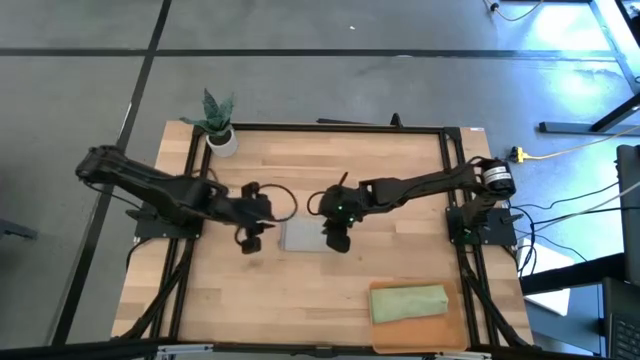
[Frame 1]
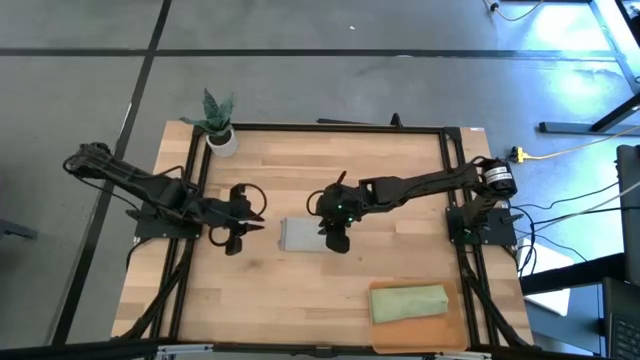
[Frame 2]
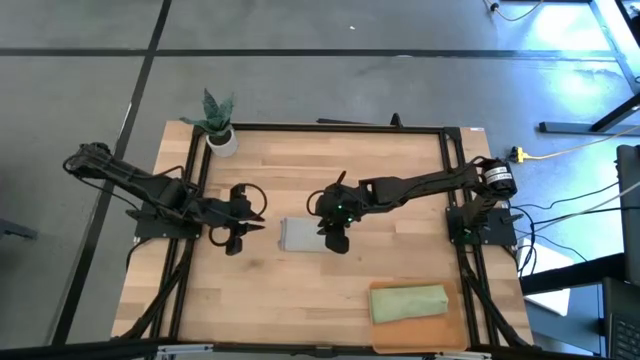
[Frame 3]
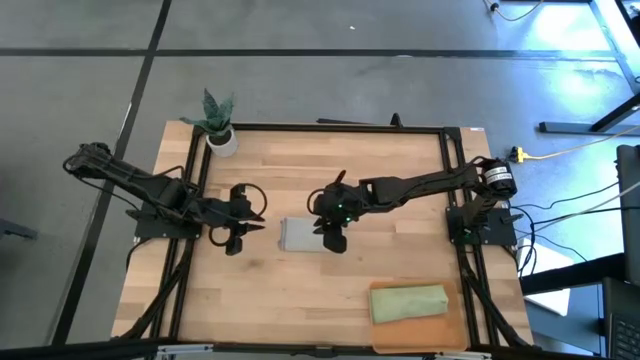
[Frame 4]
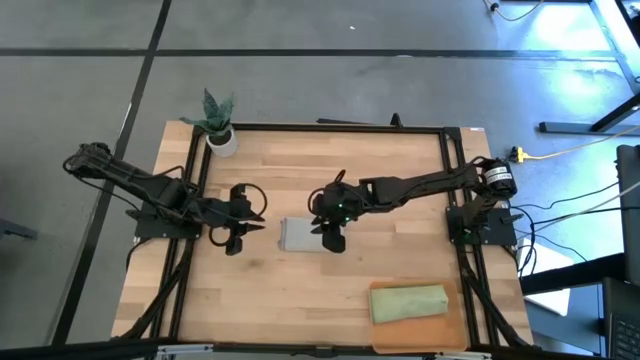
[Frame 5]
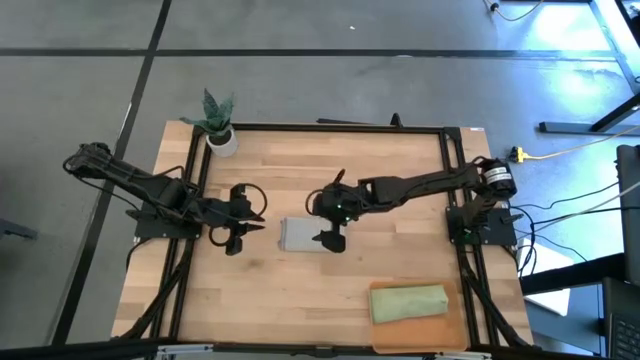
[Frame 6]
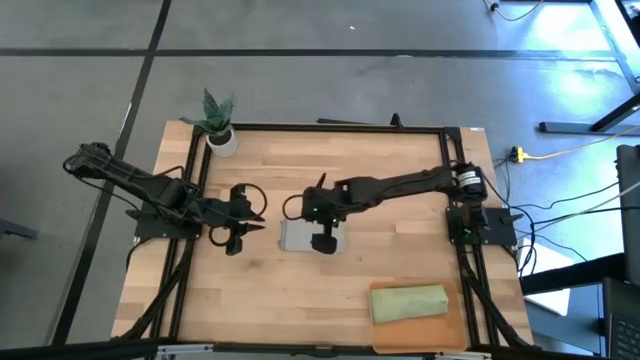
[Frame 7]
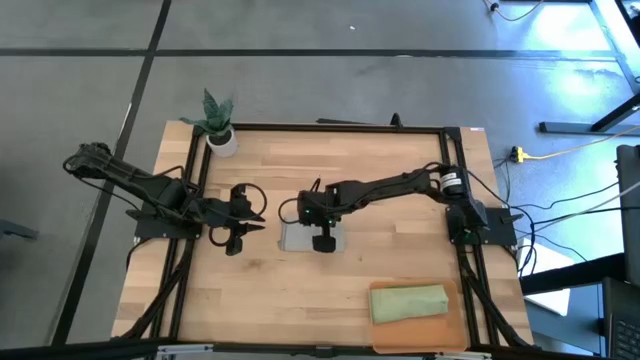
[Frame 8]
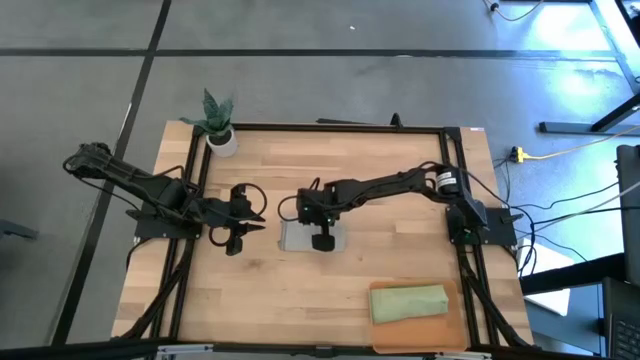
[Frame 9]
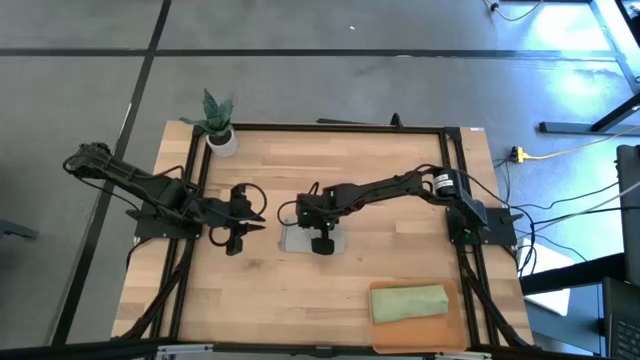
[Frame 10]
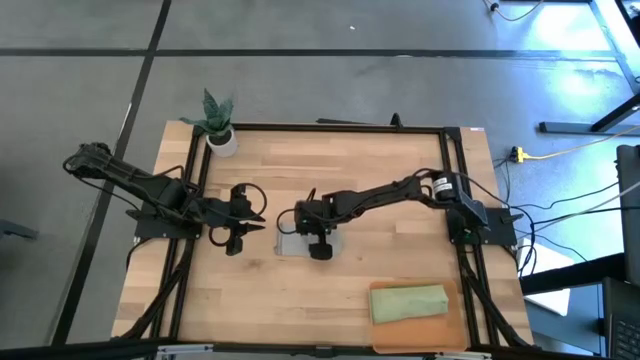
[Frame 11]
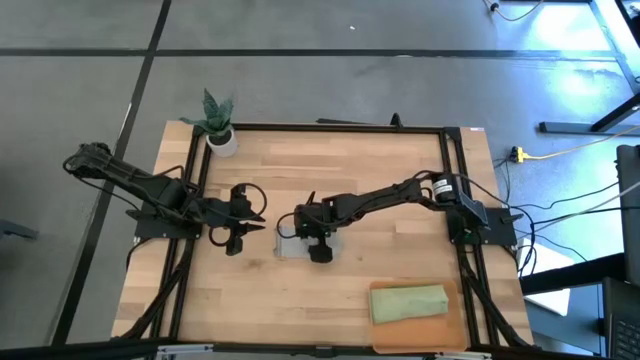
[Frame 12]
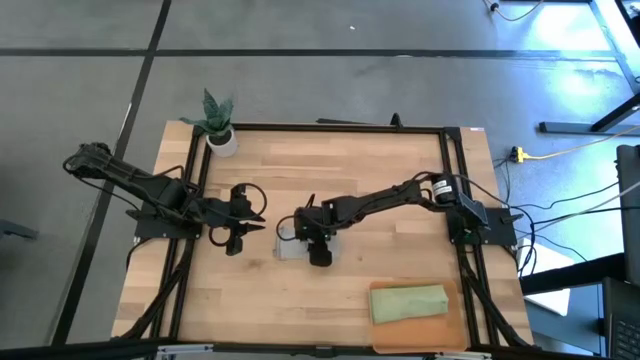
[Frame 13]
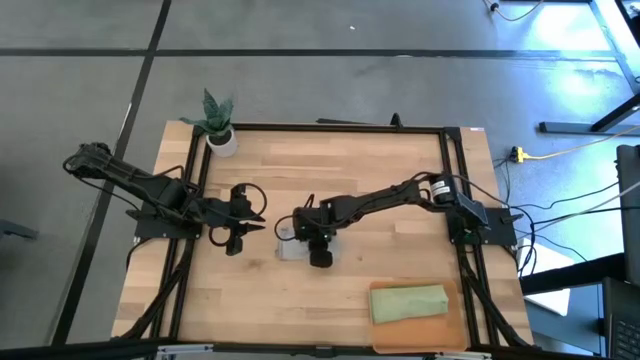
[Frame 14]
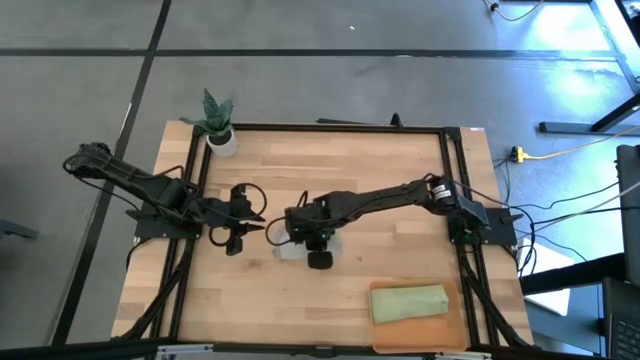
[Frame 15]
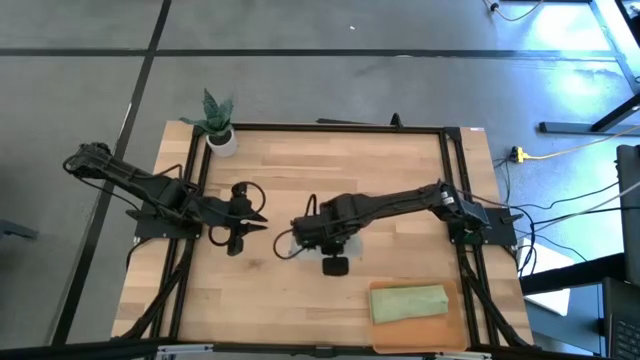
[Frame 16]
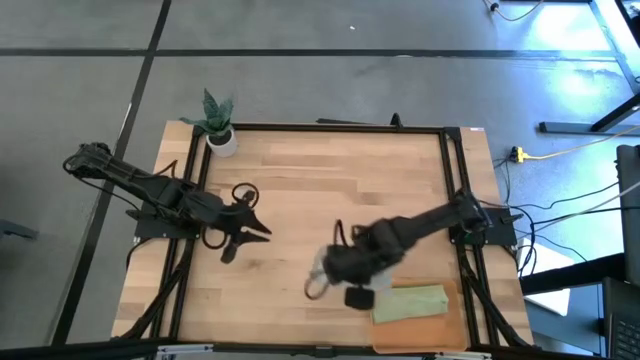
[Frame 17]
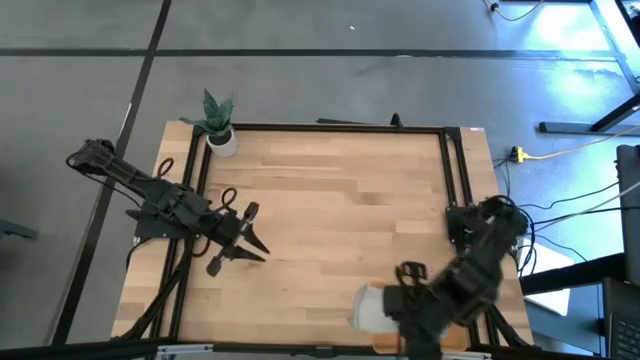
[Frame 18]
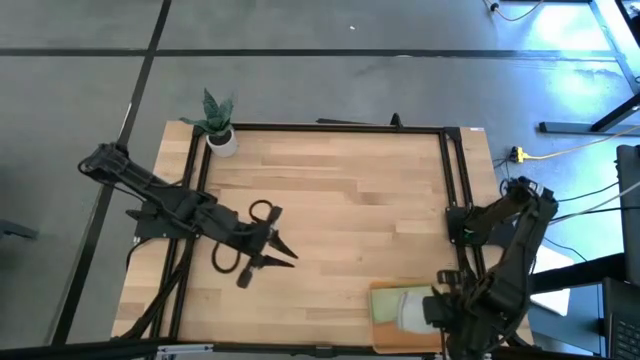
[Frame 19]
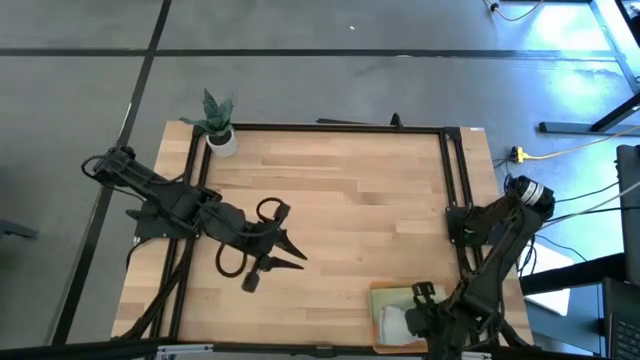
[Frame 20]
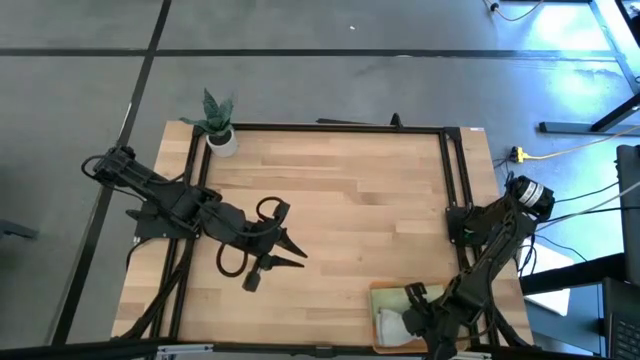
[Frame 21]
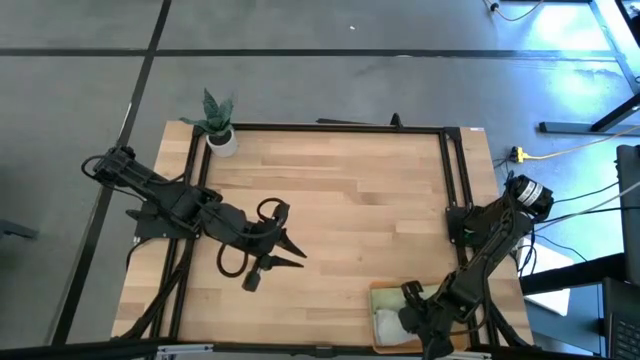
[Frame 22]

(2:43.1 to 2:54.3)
Task: Roll microfiber towels into tight, uniform cylinder then place into a basket
Put the gray microfiber cloth into the orange bin

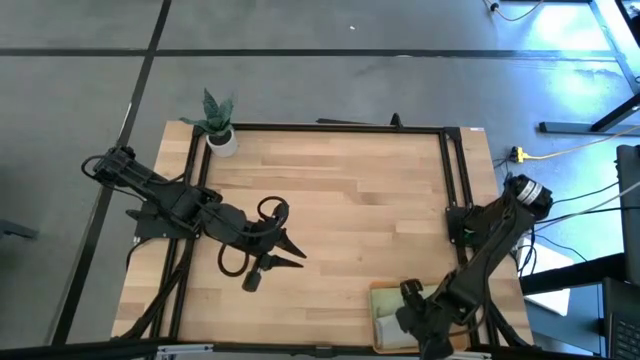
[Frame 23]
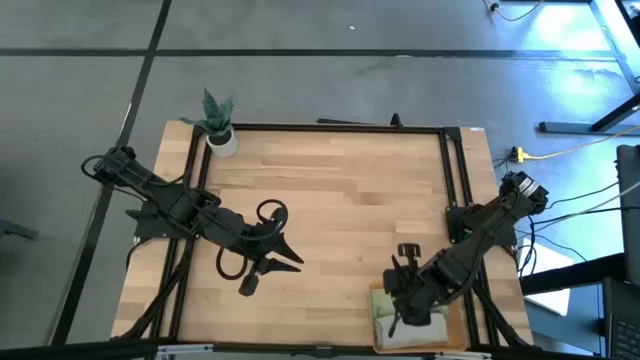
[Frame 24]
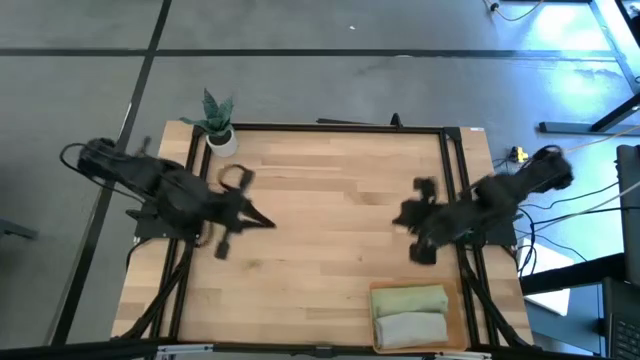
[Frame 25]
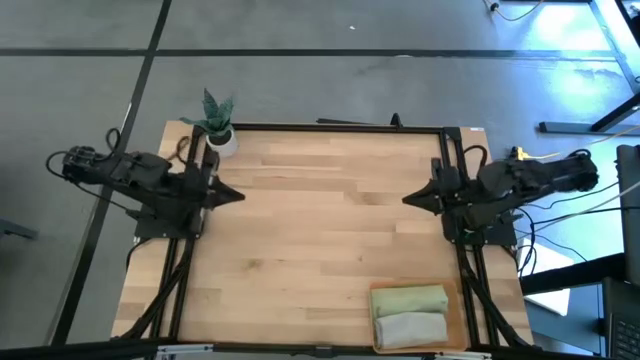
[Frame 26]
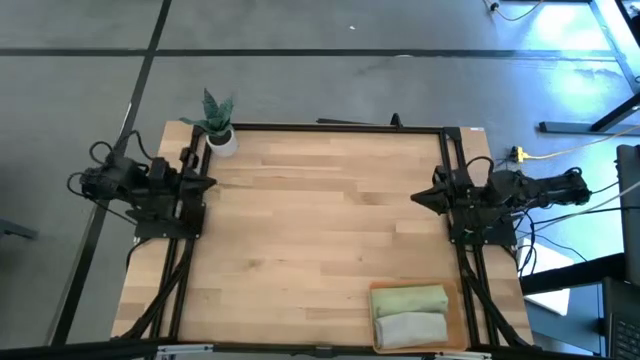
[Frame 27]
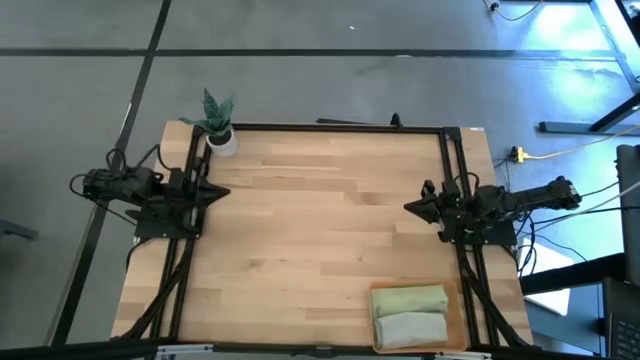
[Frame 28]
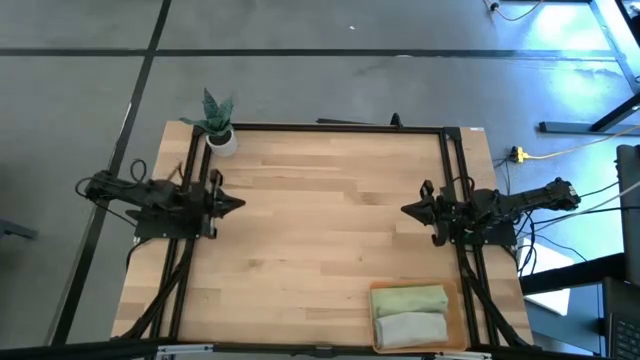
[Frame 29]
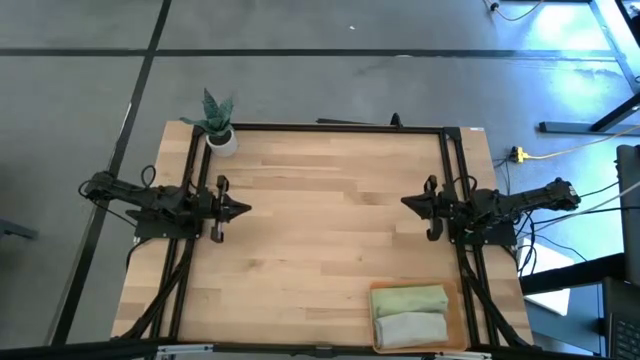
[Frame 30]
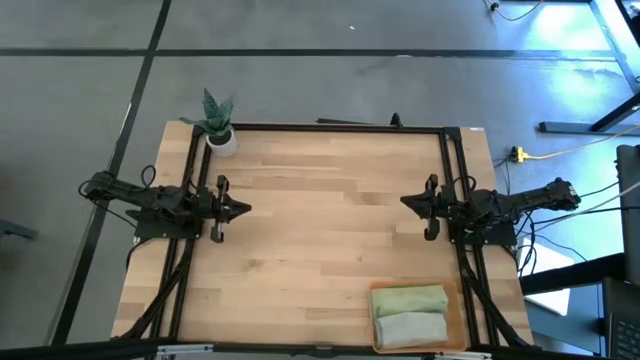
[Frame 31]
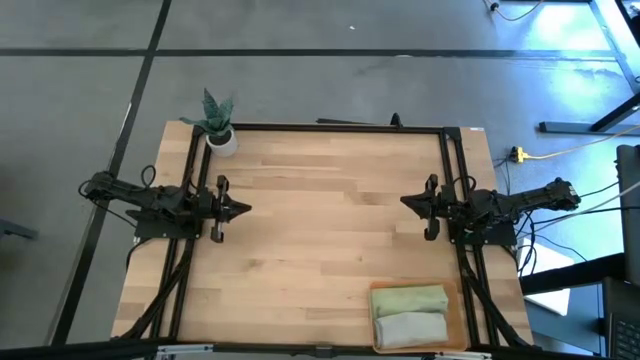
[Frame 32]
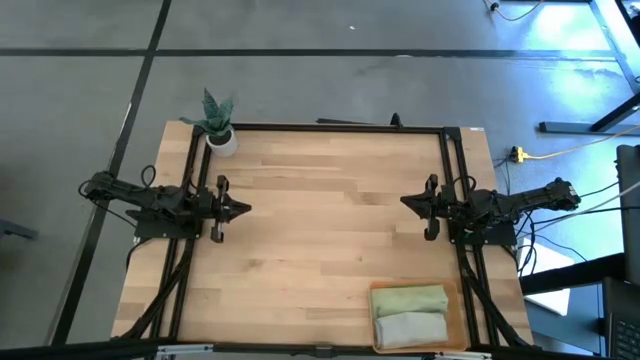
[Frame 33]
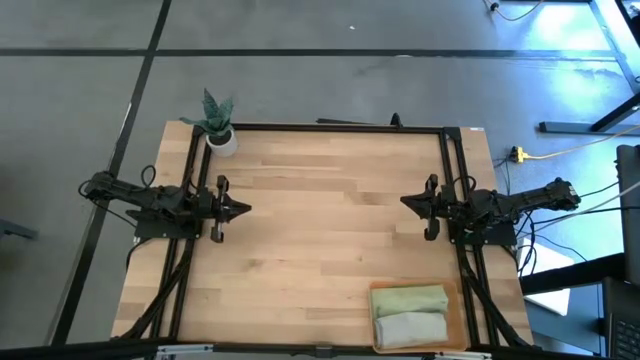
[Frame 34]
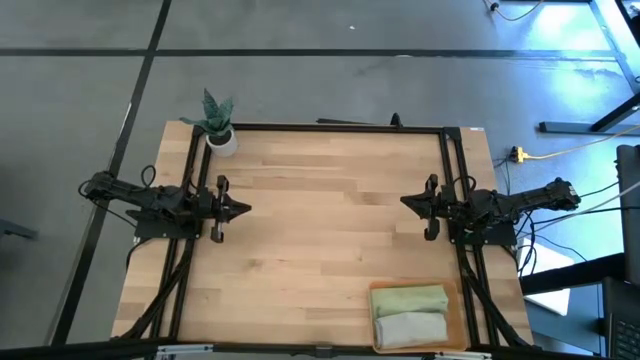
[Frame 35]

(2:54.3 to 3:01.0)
Return to Home Position

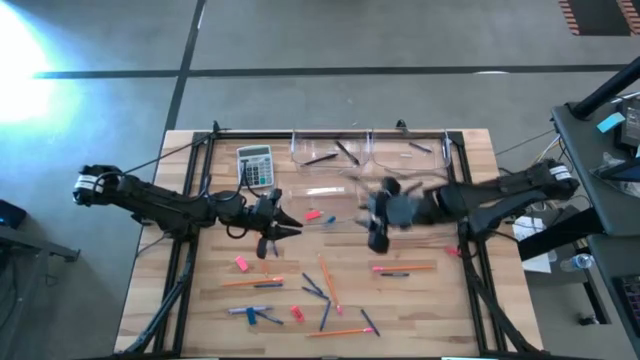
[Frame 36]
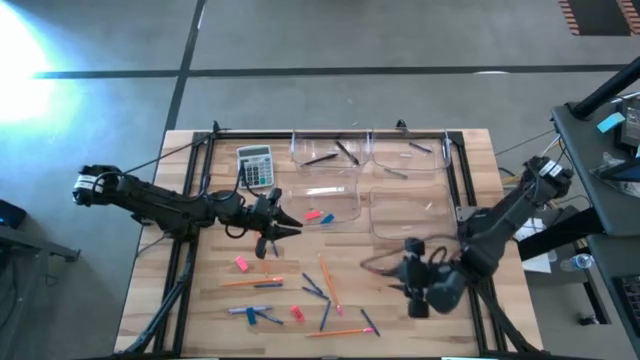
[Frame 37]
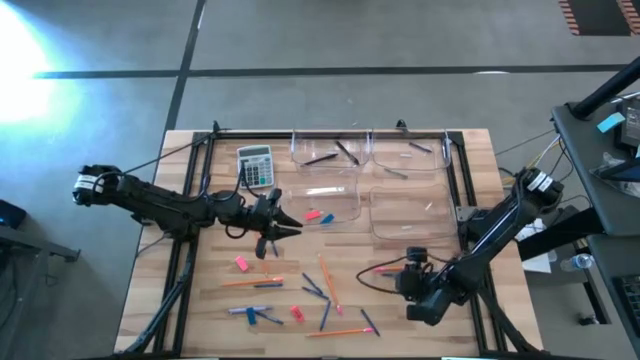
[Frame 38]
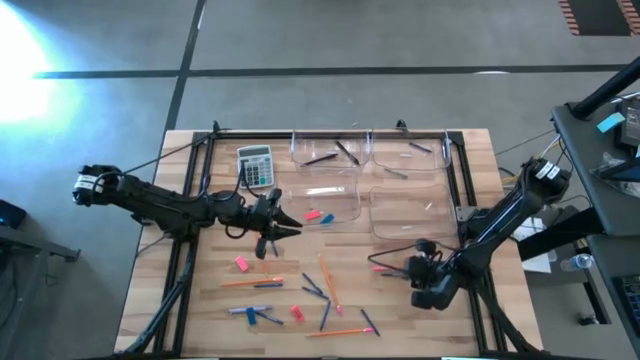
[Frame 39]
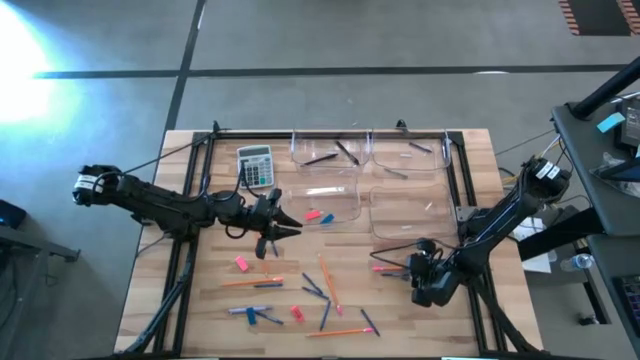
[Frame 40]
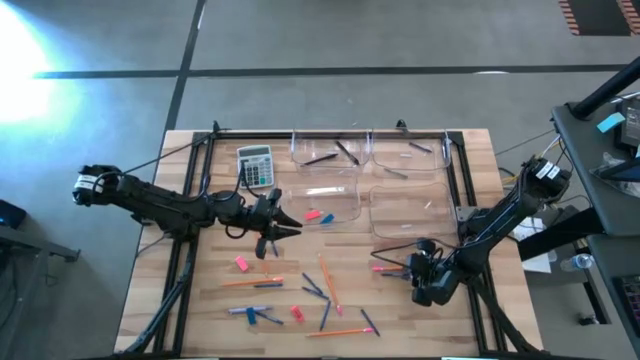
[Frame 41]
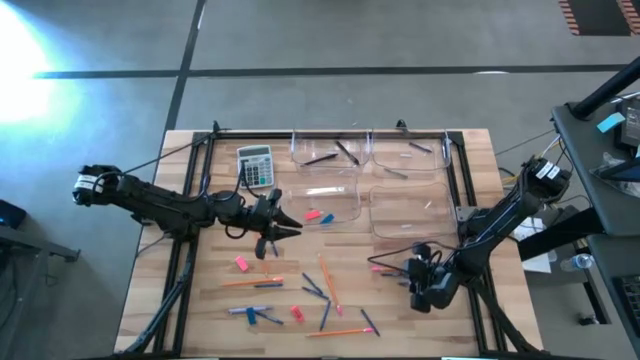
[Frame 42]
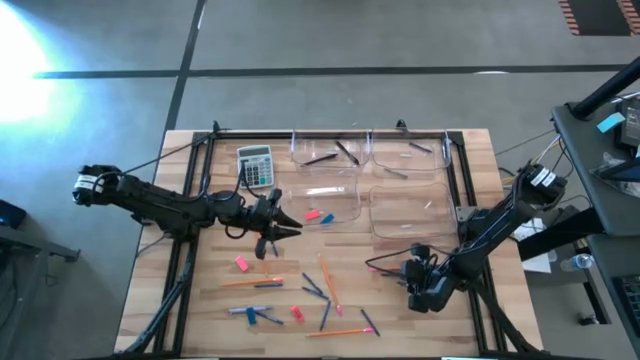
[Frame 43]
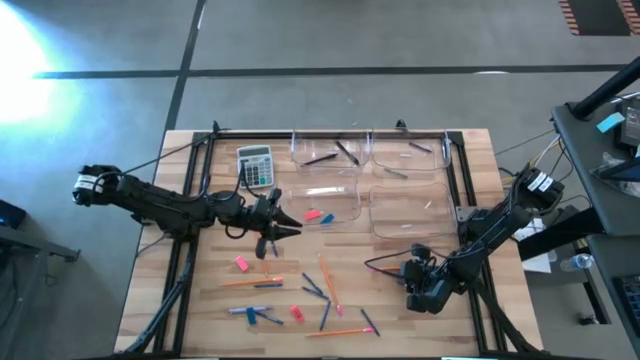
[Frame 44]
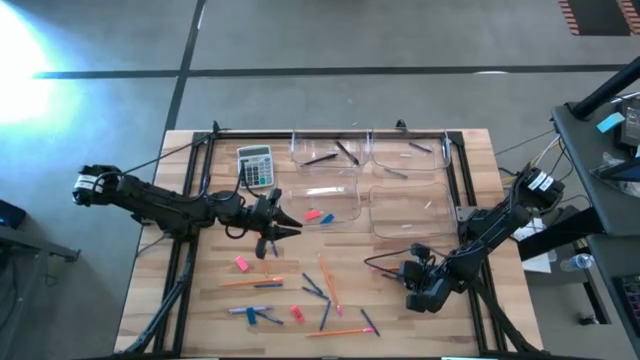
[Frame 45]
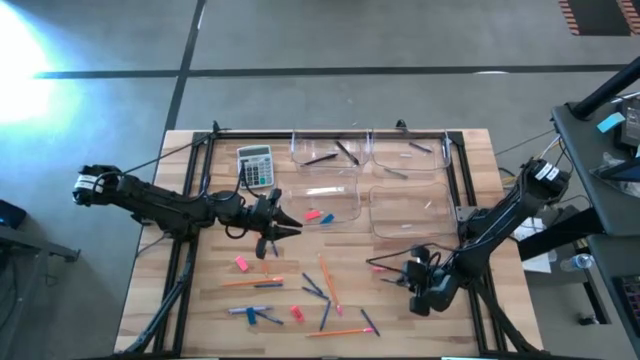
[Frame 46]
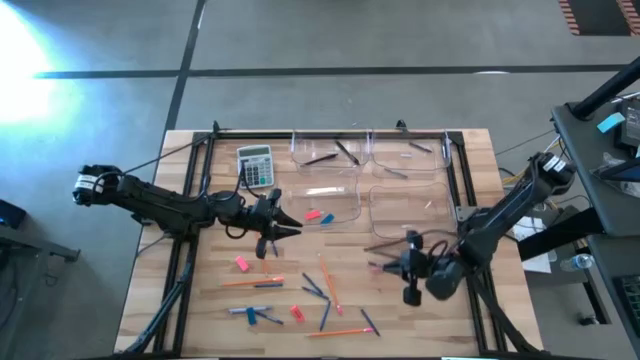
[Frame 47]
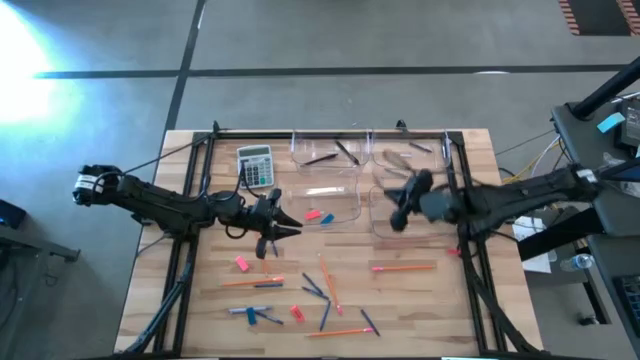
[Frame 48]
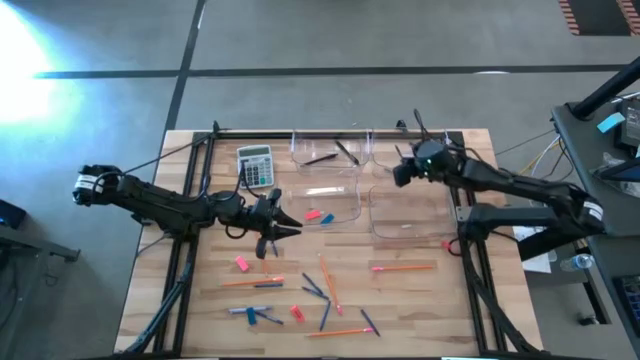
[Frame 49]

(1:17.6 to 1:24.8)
Task: Sort crayons/erasers/pens/pencils in bins
Put the blue crayon into the top right transparent bin
